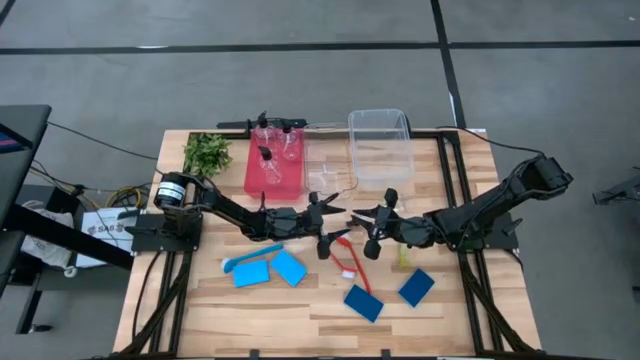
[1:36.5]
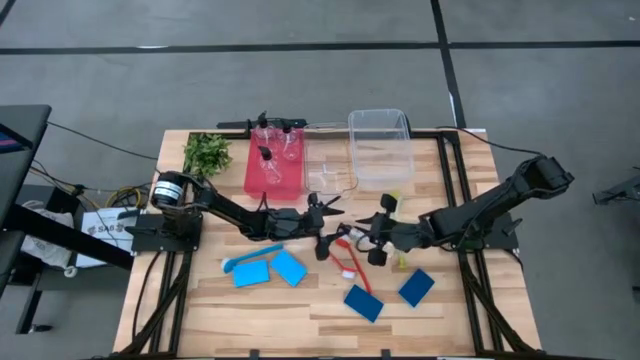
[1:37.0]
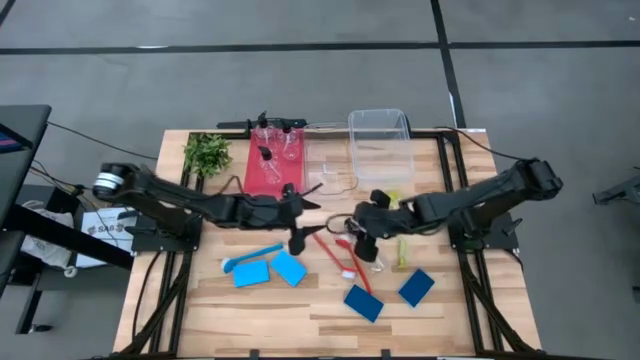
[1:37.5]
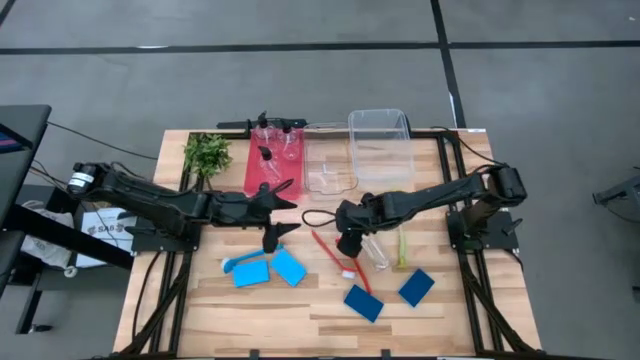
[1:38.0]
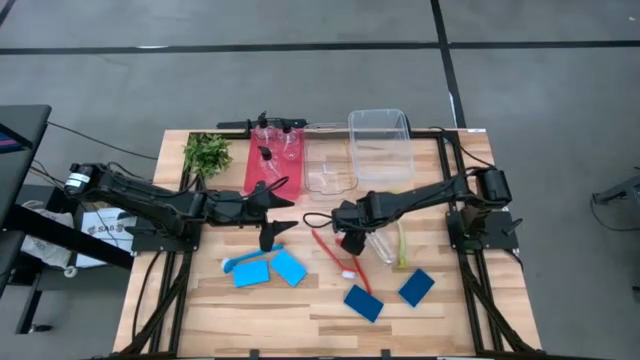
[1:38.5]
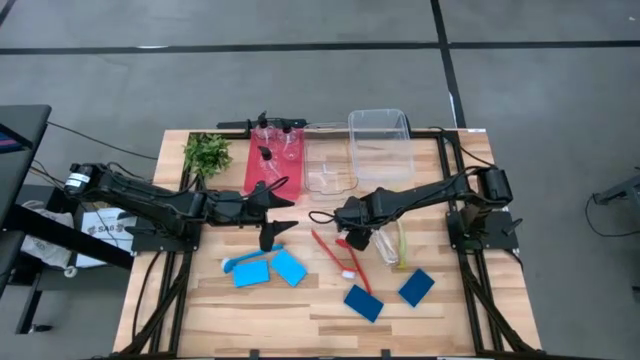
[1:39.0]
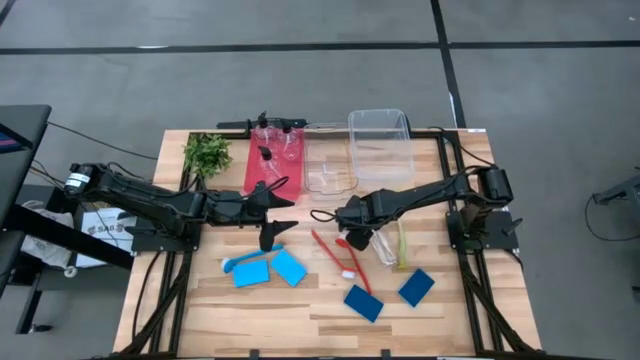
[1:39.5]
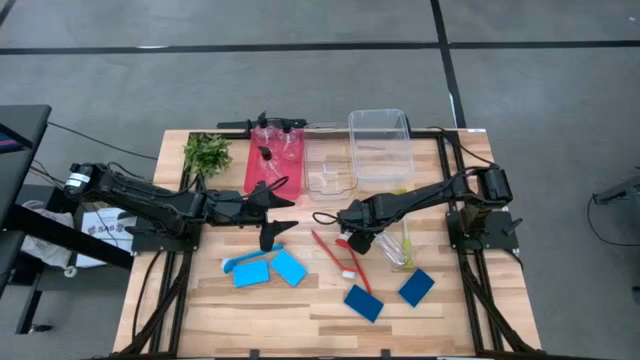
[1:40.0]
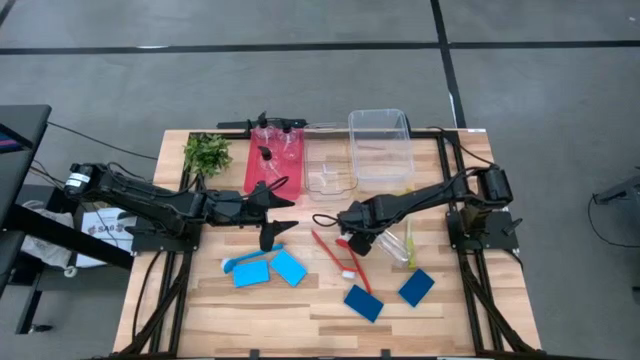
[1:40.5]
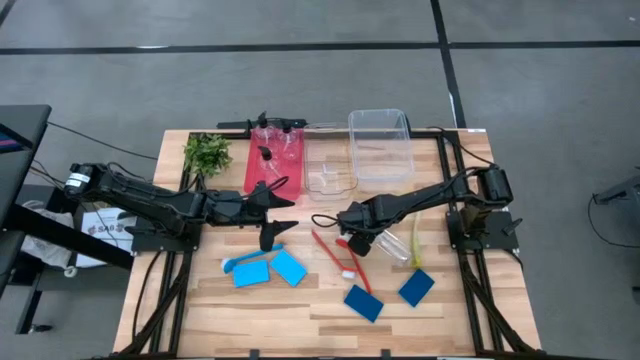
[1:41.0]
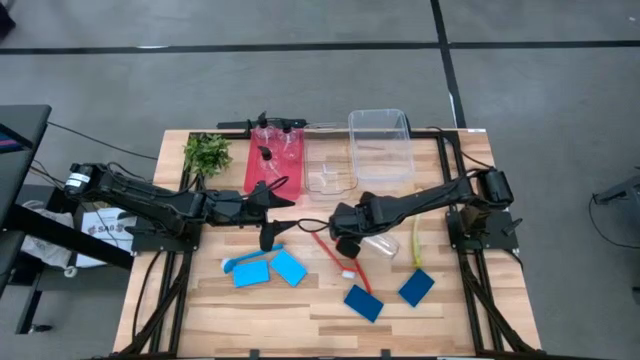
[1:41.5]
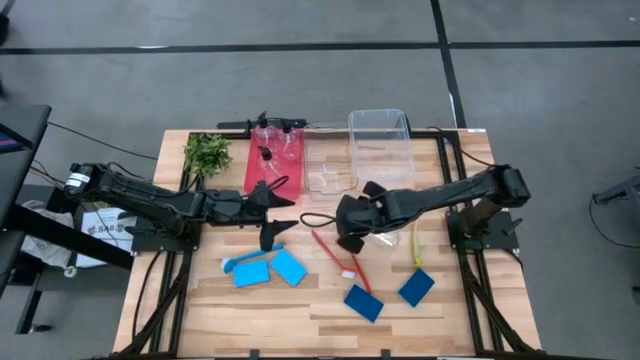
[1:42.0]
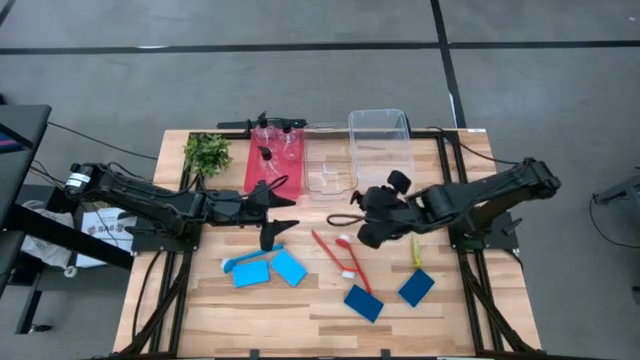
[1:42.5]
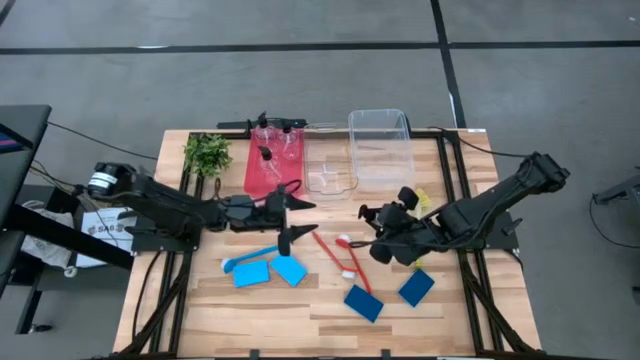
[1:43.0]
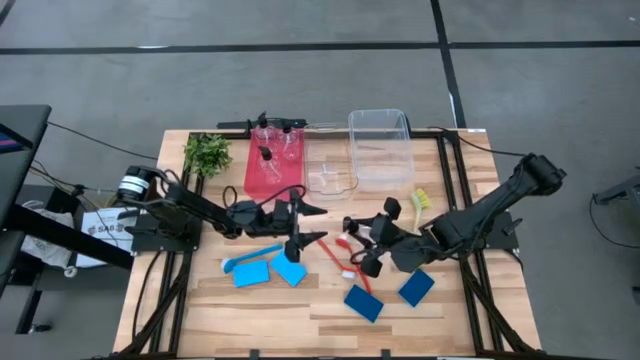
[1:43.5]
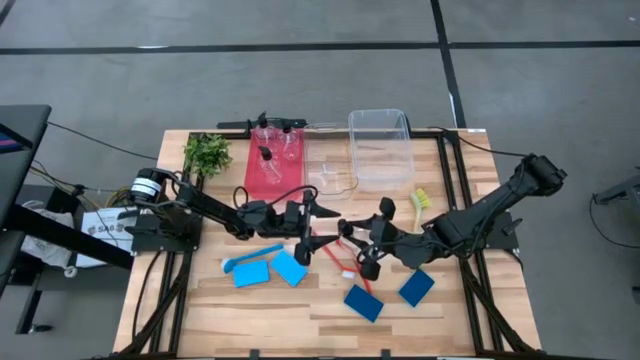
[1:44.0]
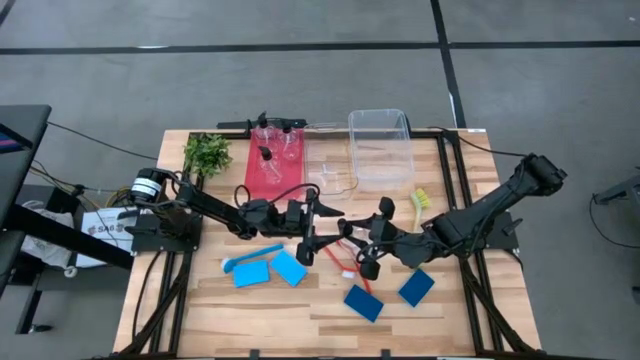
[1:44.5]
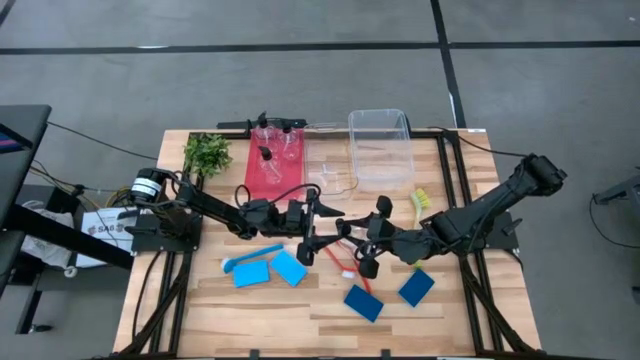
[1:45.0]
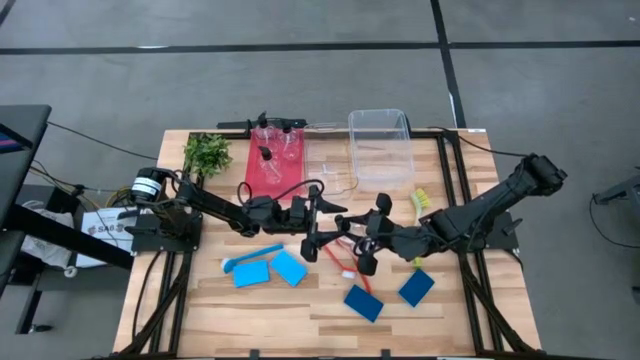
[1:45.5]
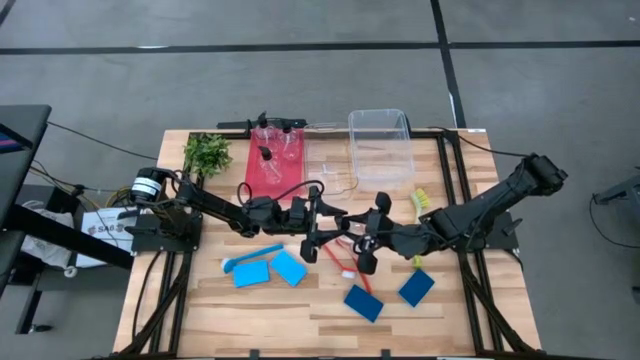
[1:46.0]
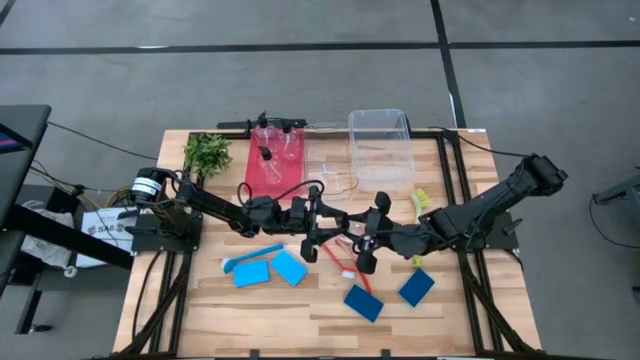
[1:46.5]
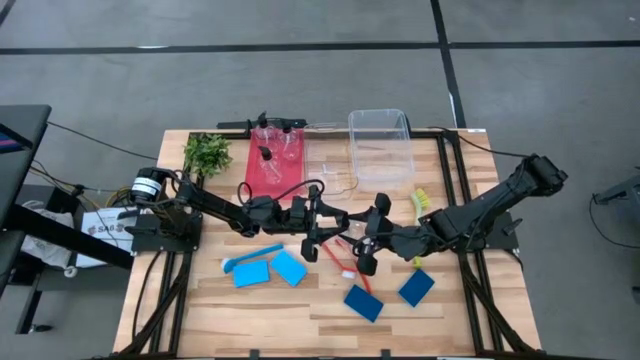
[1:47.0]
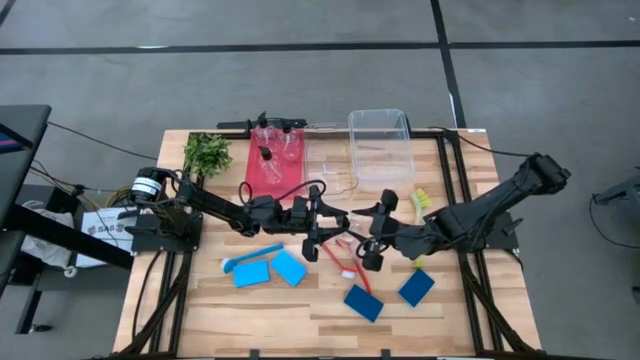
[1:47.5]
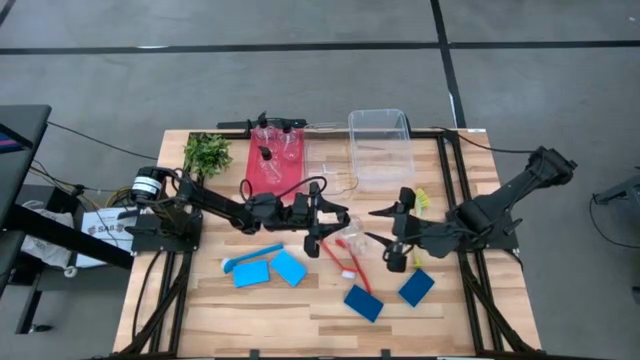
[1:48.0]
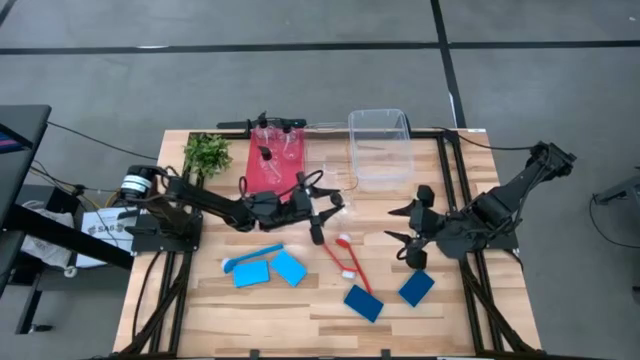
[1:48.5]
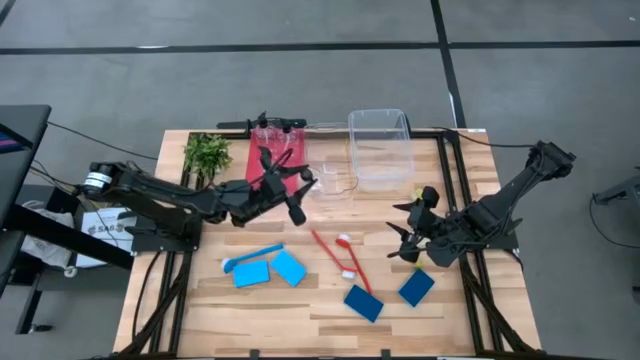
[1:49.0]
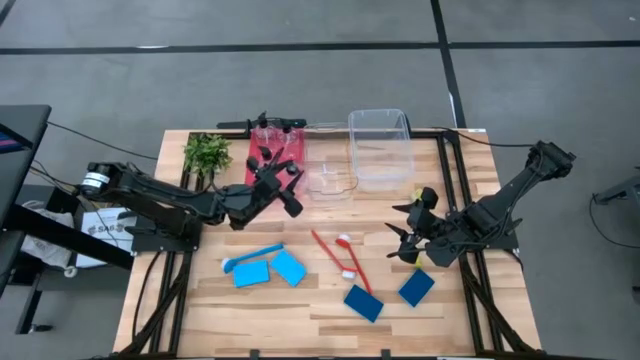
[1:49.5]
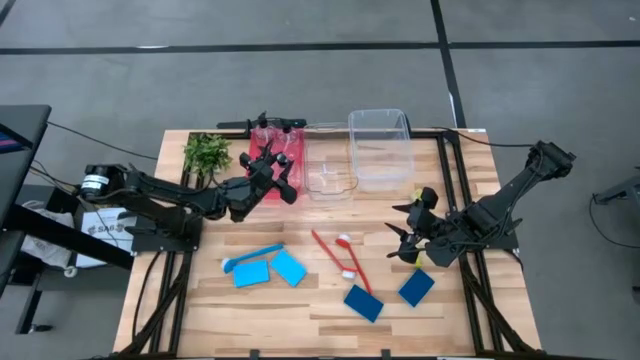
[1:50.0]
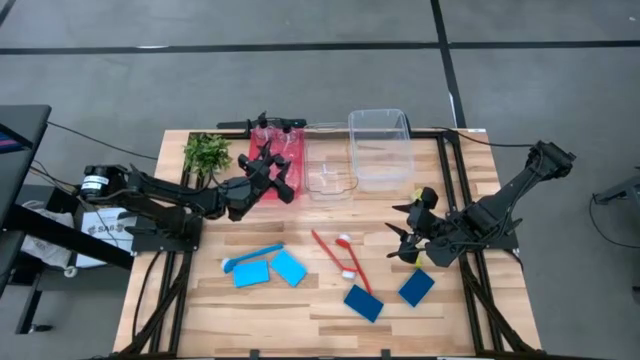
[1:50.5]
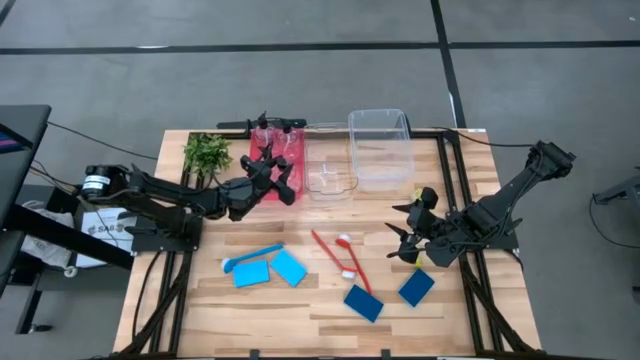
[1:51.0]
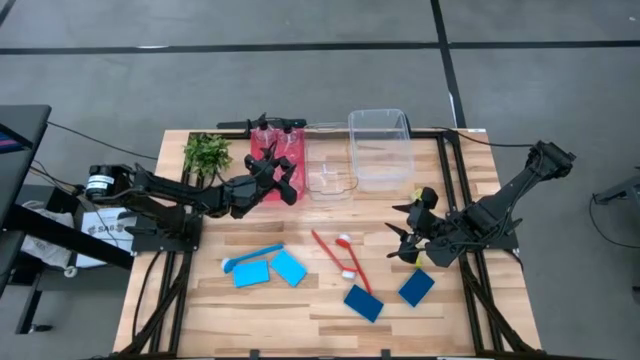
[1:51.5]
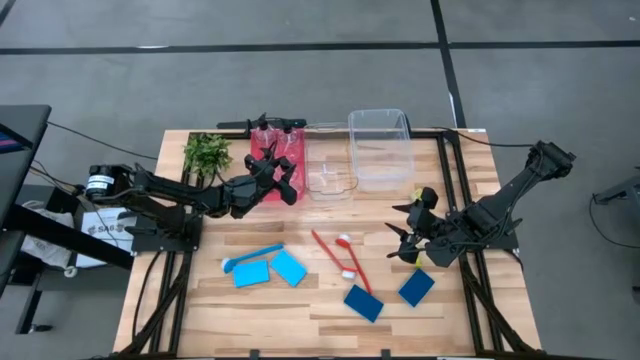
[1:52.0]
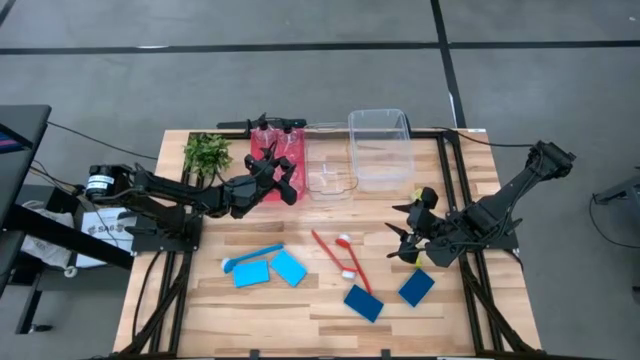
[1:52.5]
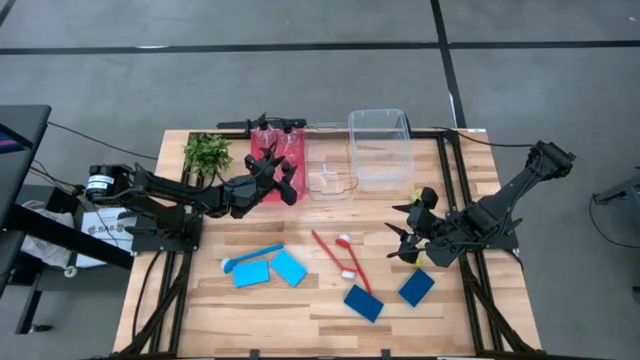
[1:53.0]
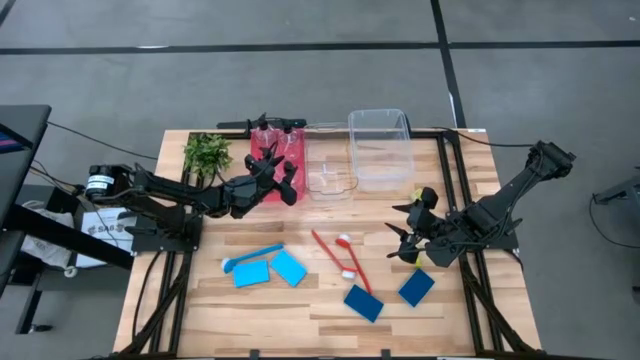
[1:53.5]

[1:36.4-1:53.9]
Task: Pick & Place Kitchen Sink Supplies
Put the transparent soap dispenser into the red bin

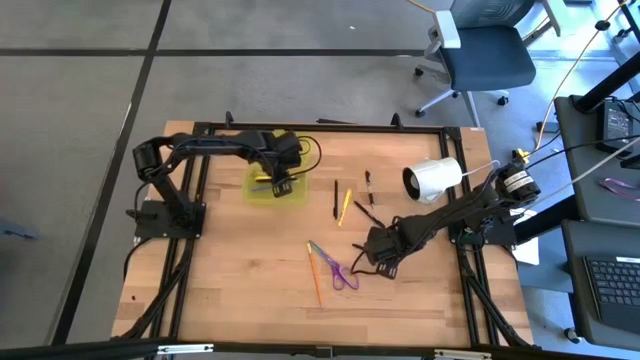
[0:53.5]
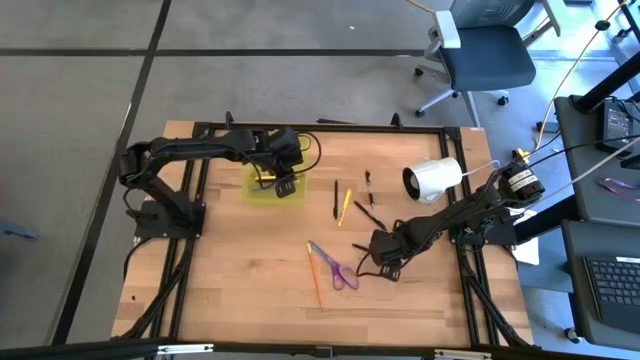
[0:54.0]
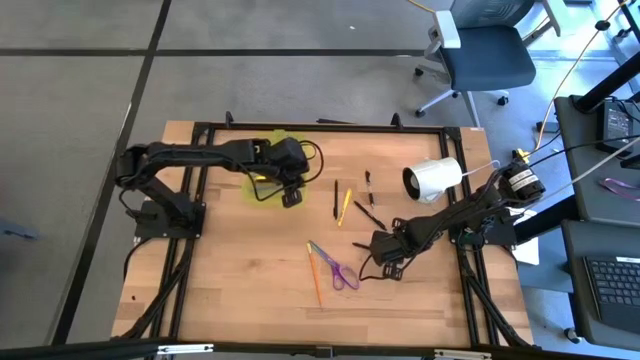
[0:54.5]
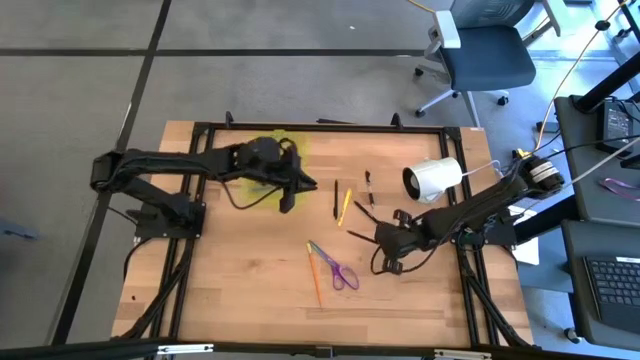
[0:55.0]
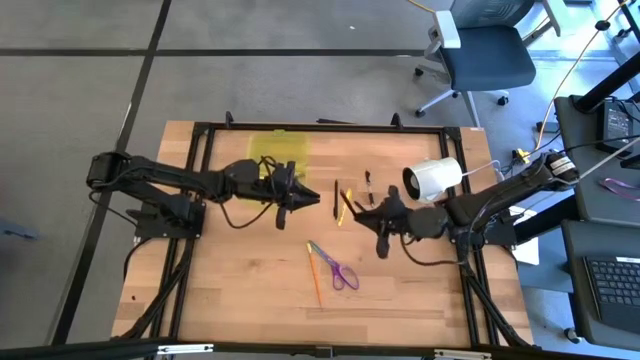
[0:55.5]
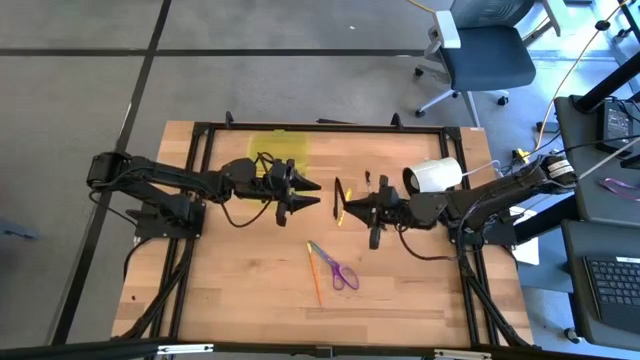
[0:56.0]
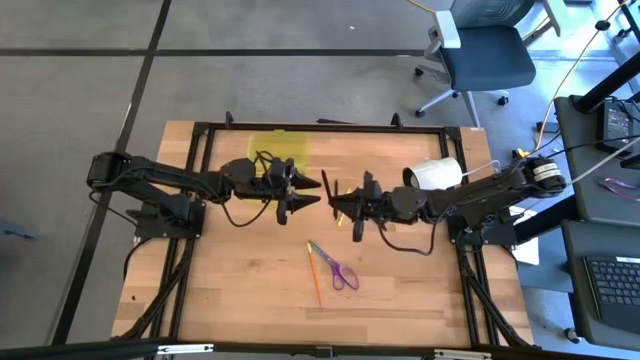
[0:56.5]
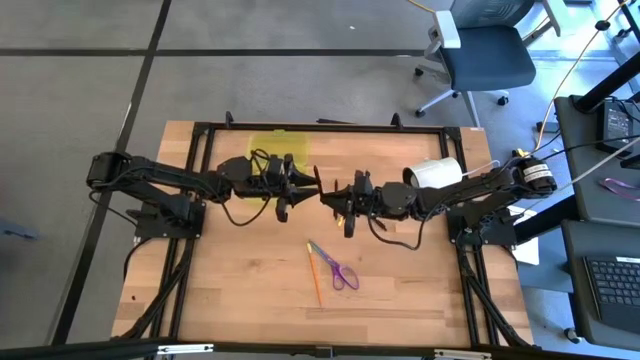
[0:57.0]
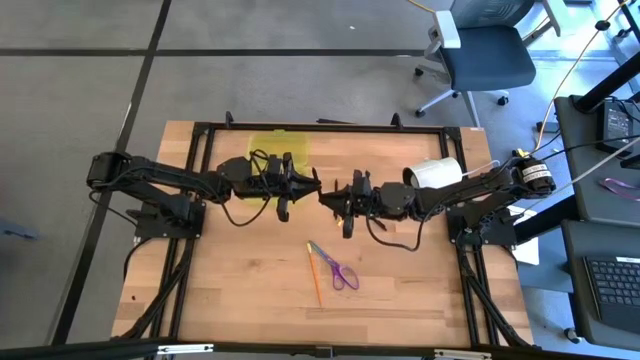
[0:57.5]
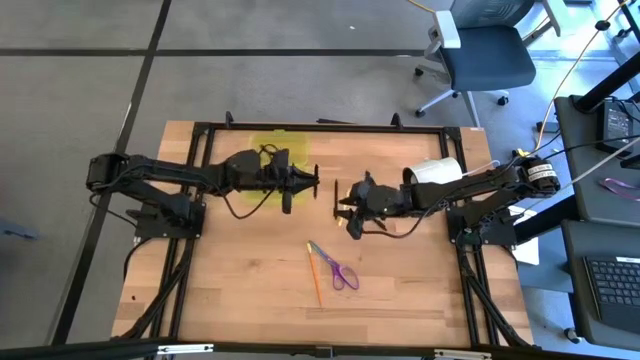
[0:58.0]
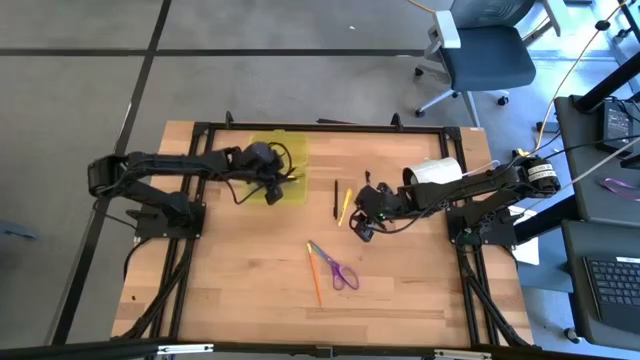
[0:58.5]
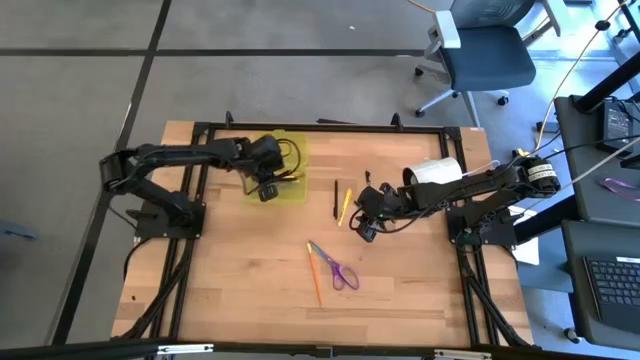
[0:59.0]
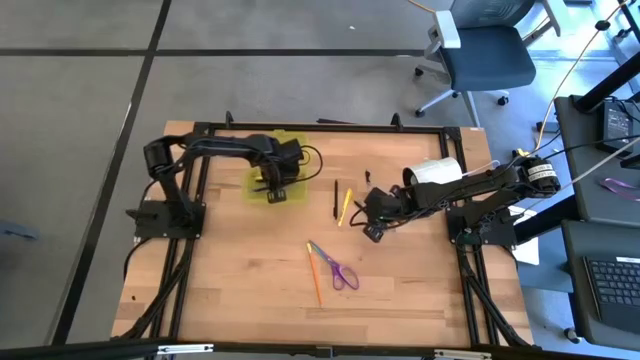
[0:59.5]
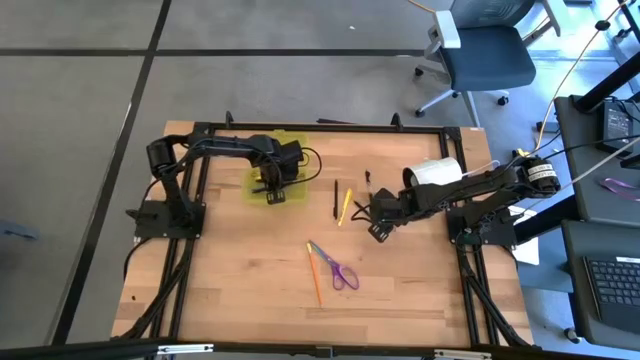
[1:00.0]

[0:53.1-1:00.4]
Task: Pick & place school supplies into a supply box
Put the black pen into the yellow supply box
